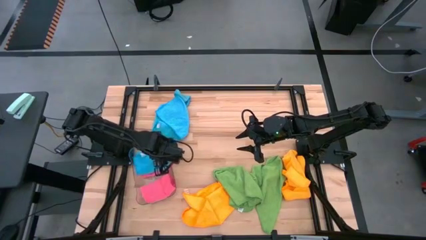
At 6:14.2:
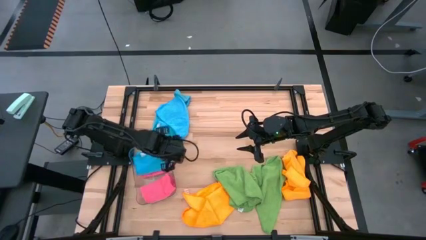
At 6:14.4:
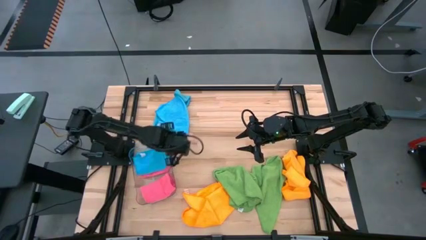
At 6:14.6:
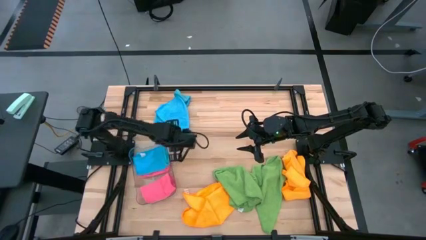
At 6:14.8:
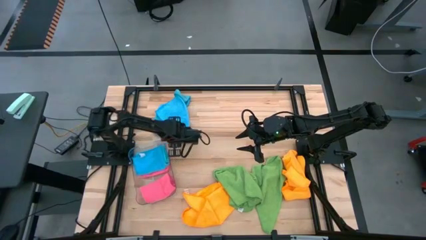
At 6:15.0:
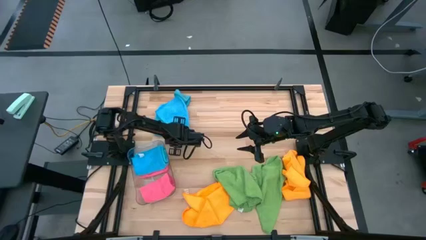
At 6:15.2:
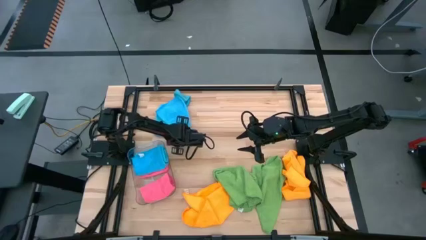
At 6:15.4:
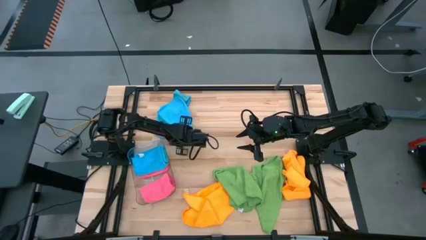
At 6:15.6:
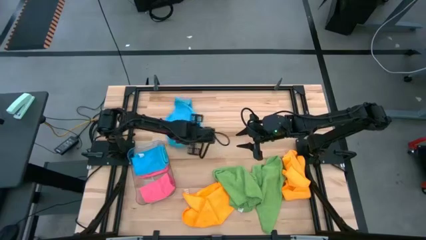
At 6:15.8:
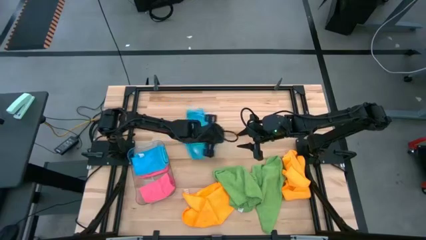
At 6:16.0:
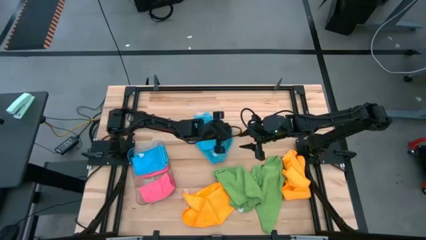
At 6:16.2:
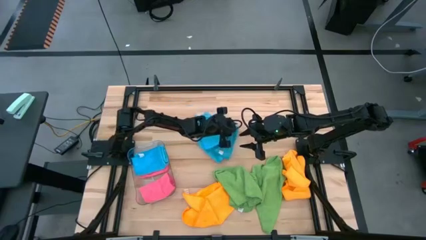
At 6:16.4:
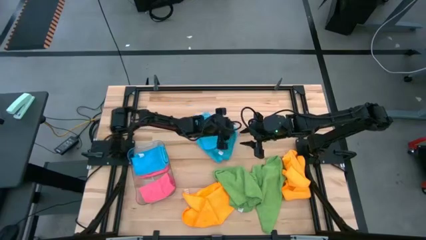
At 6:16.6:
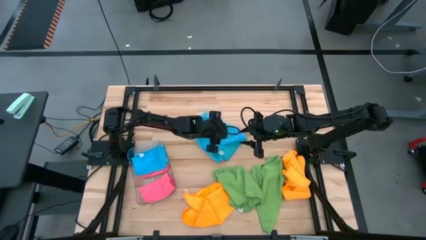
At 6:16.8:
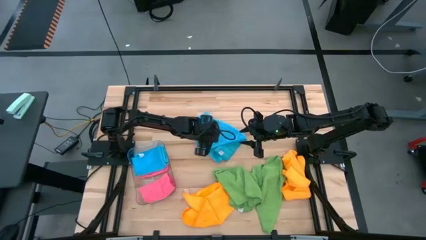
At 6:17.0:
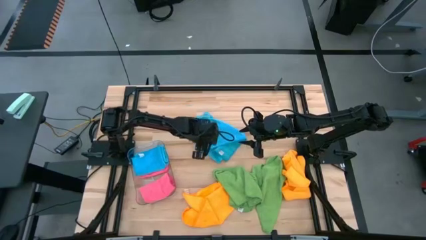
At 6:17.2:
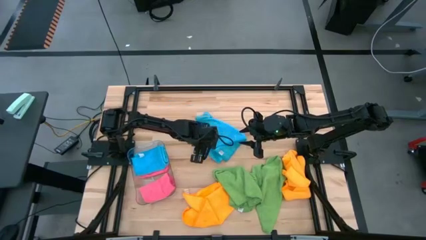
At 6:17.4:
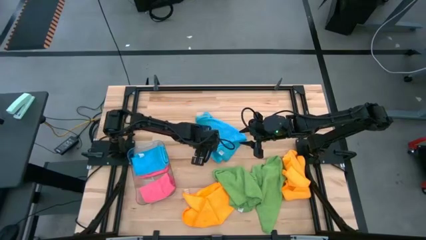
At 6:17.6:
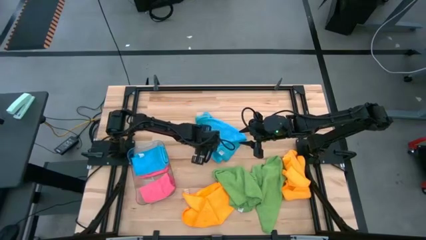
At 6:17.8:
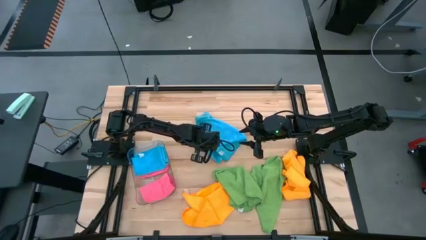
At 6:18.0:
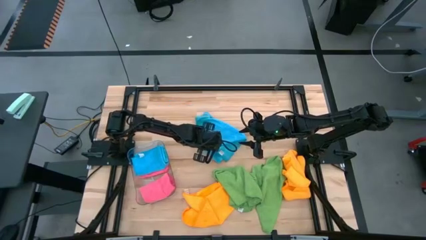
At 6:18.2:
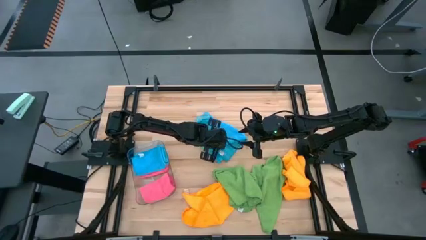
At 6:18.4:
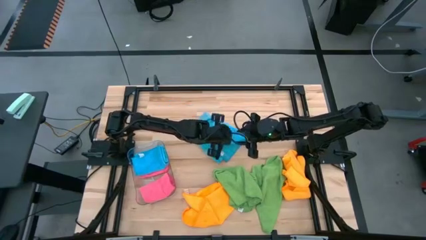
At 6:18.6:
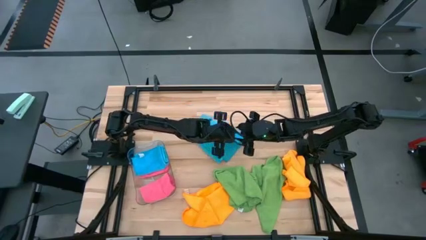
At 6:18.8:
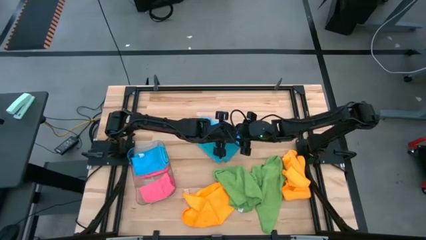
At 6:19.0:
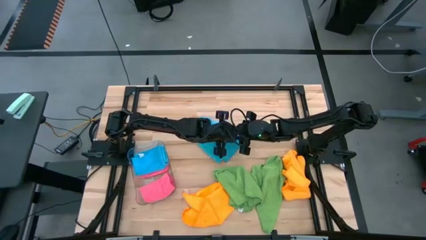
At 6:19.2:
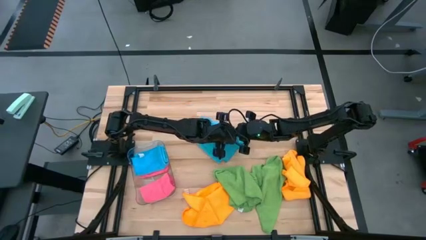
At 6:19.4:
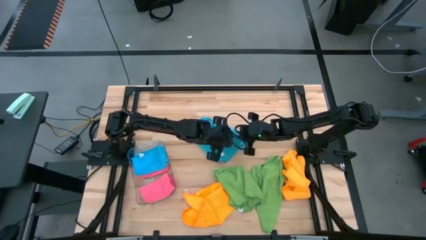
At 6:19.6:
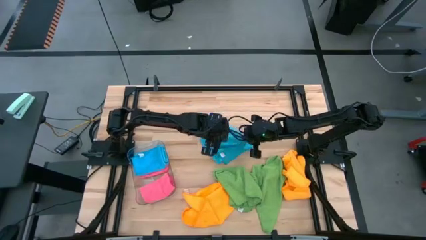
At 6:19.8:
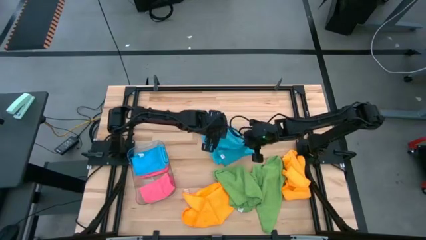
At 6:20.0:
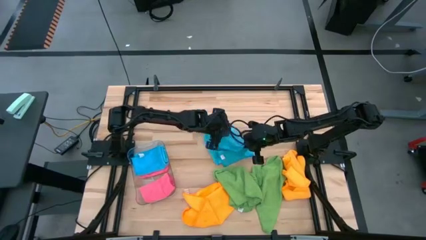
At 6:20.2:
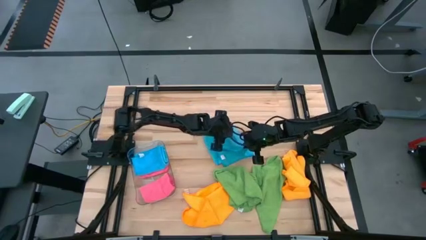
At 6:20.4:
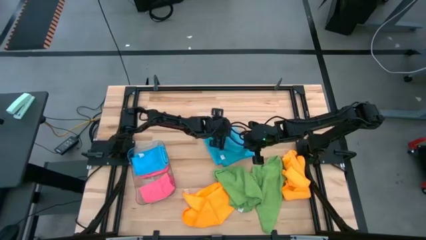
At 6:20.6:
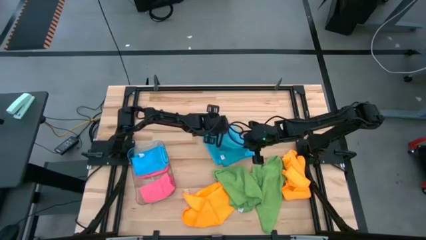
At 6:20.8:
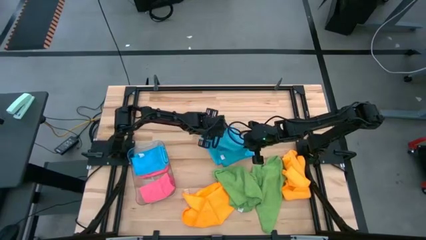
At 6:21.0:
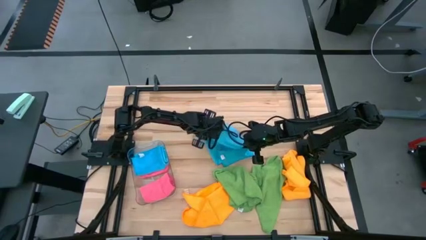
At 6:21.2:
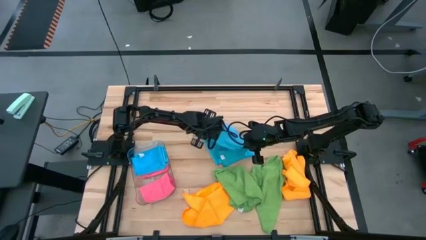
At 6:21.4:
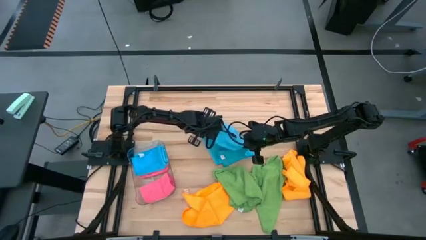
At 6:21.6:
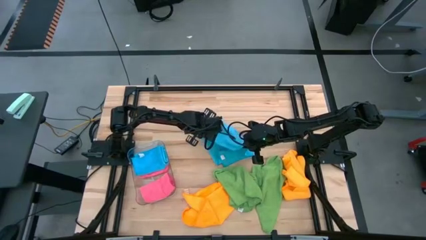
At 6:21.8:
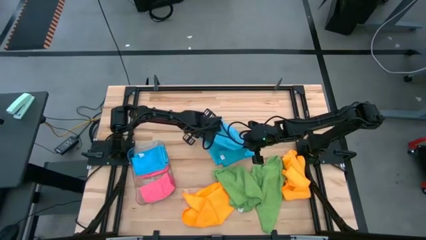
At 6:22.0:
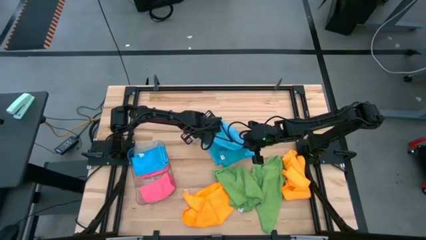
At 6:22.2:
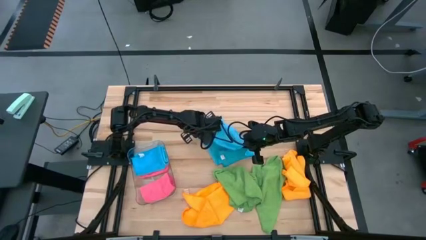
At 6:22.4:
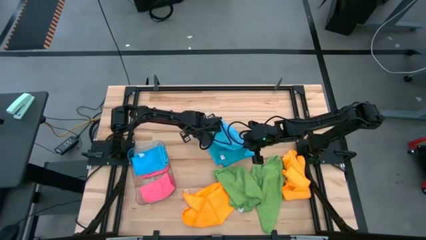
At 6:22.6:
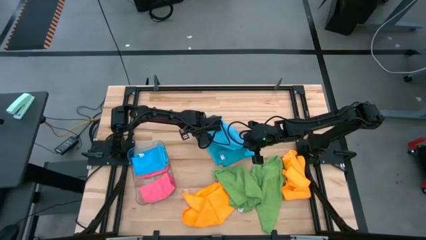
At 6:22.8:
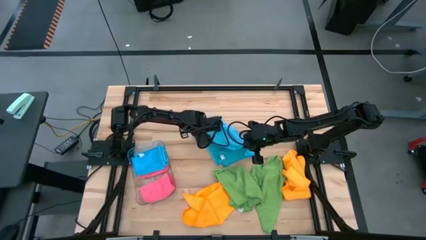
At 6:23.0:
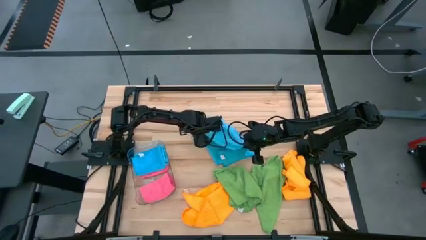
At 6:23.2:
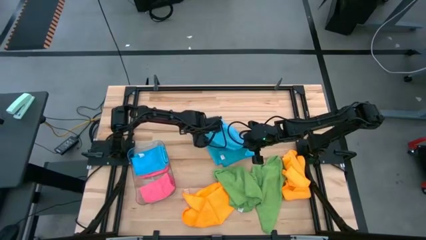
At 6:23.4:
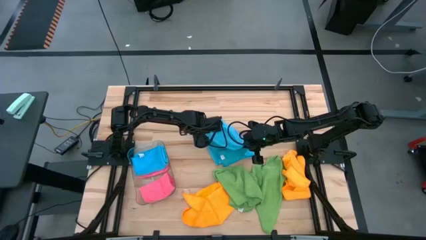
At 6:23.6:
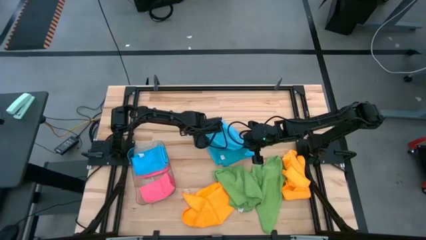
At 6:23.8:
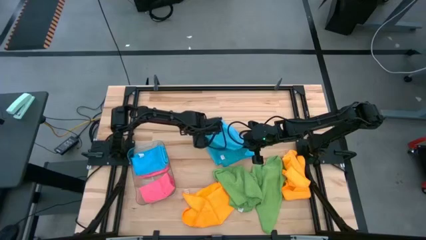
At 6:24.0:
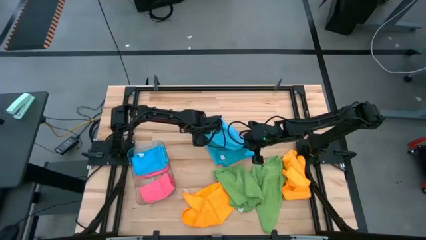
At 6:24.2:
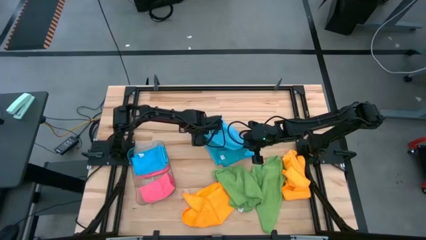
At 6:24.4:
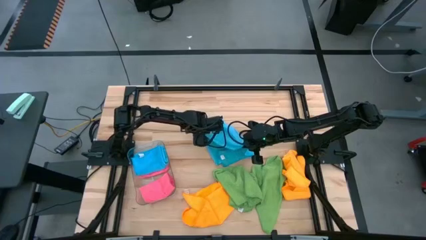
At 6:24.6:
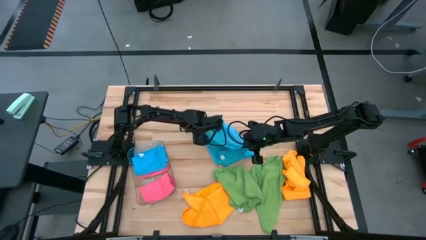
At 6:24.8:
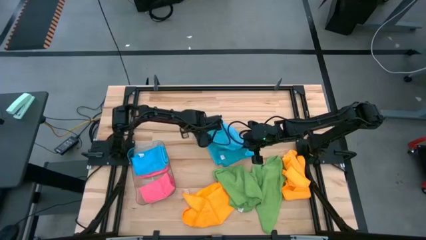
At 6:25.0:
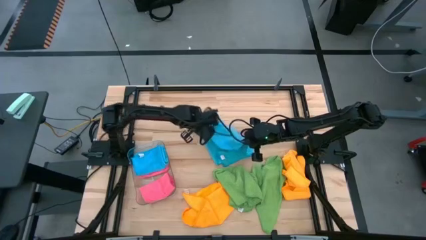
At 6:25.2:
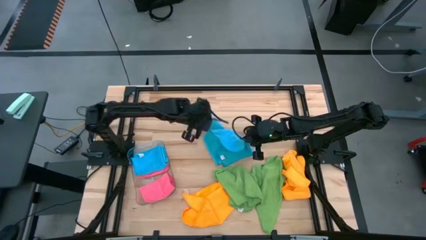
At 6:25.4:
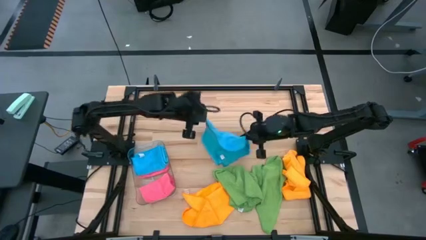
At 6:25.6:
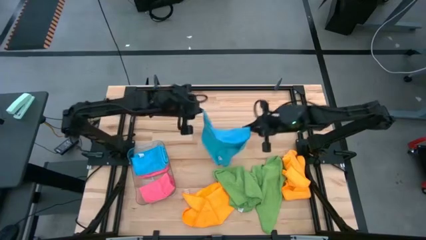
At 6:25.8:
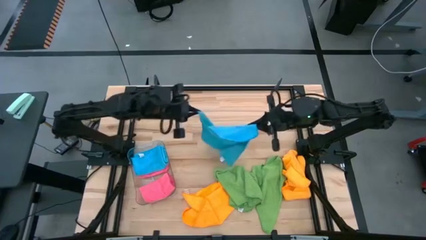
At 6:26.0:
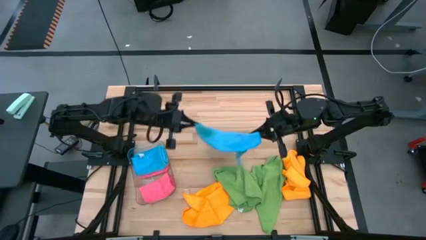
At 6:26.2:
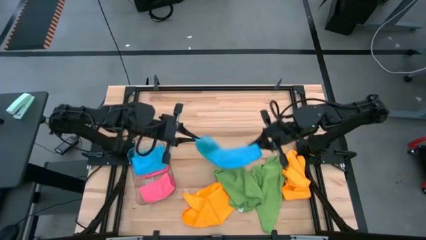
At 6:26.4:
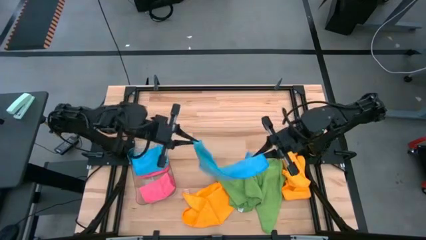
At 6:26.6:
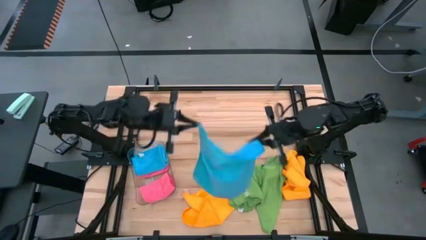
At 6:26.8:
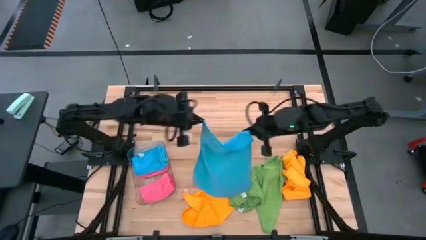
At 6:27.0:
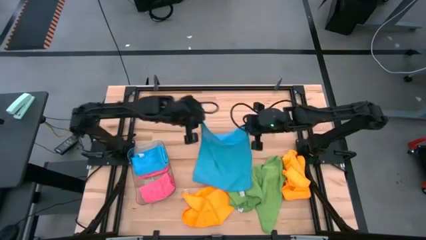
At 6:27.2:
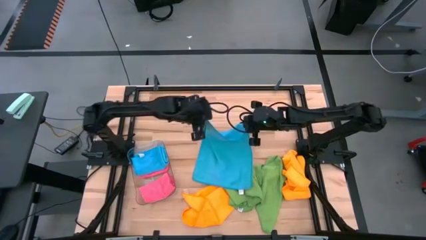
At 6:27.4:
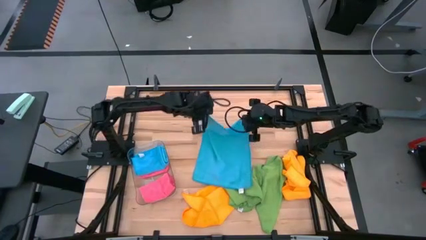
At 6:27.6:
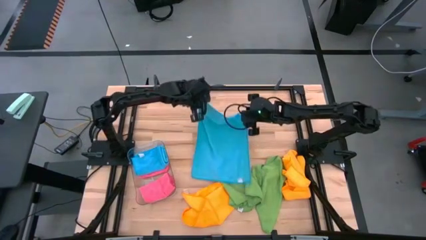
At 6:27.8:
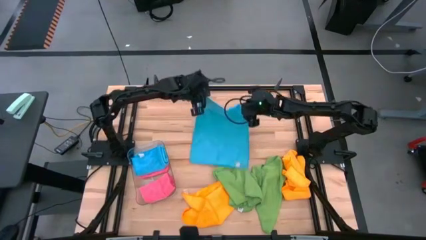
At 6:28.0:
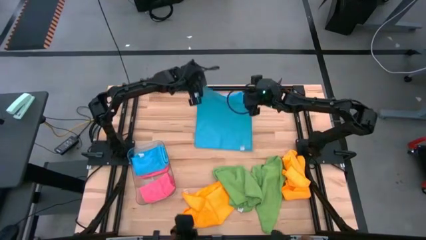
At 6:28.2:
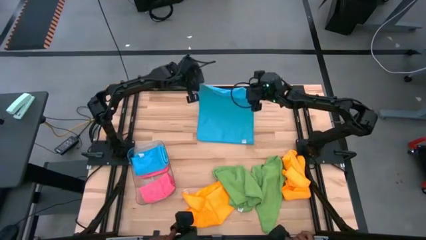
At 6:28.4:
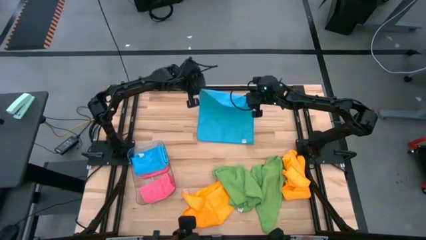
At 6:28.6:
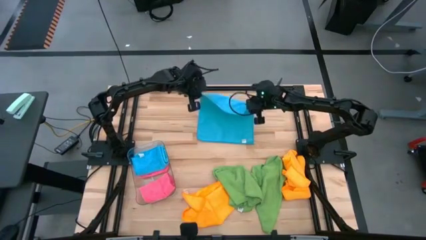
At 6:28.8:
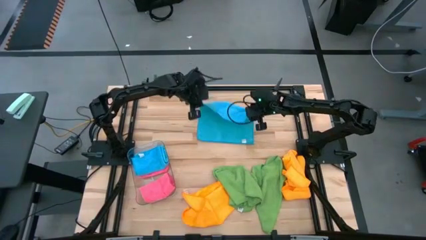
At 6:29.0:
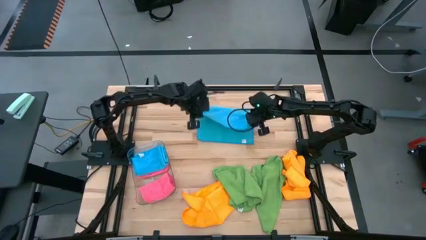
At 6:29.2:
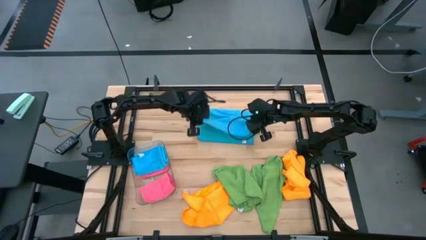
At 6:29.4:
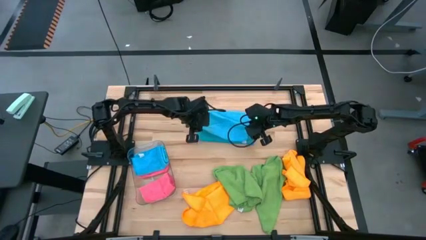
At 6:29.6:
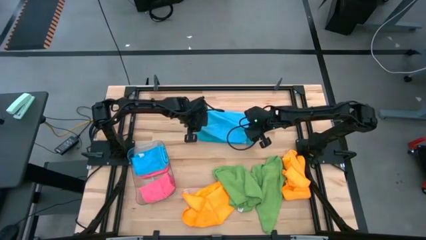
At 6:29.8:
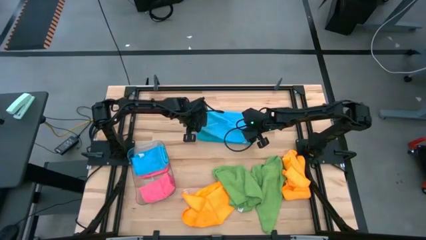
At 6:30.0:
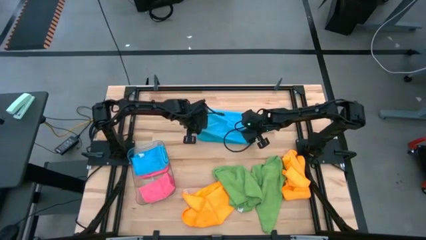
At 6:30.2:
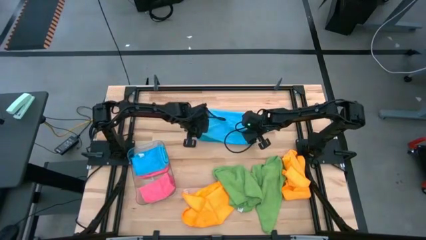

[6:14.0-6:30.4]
Task: Fold microfiber towels
Fold the blue microfiber cloth
